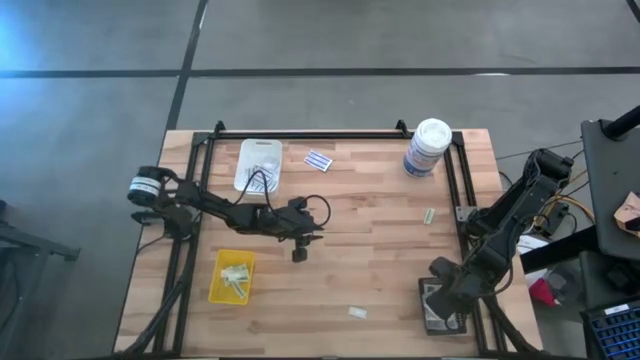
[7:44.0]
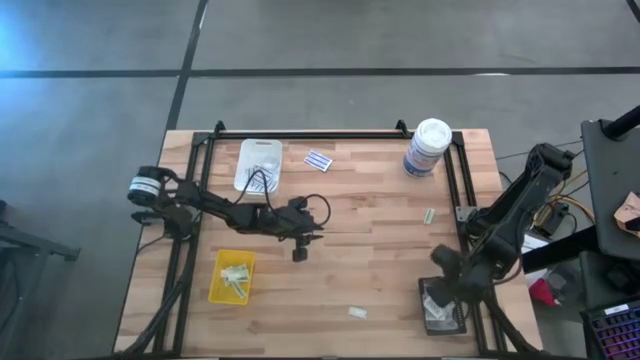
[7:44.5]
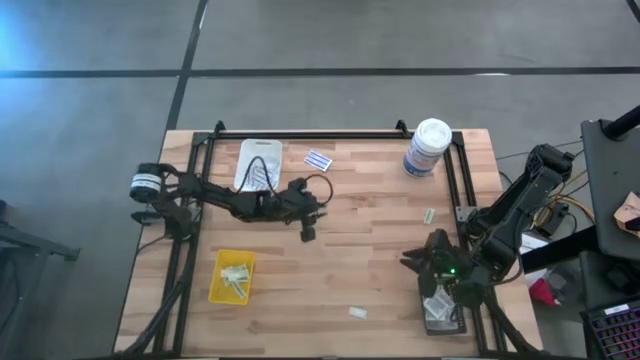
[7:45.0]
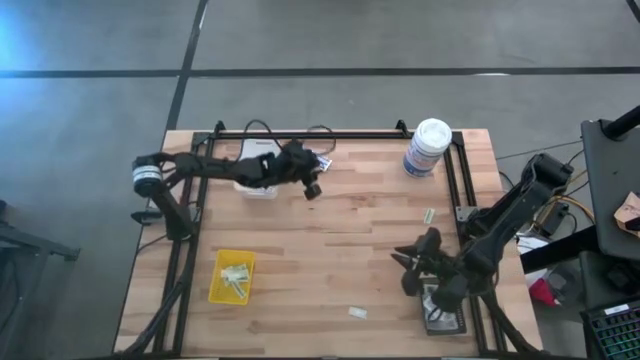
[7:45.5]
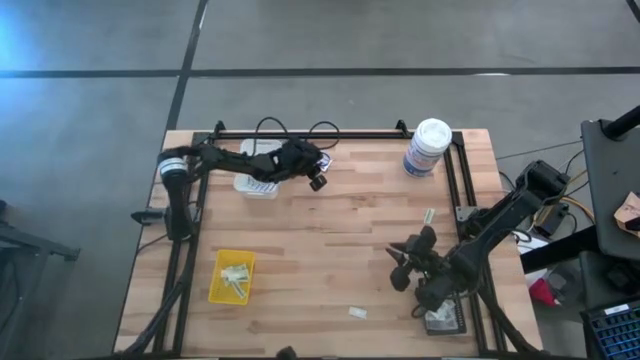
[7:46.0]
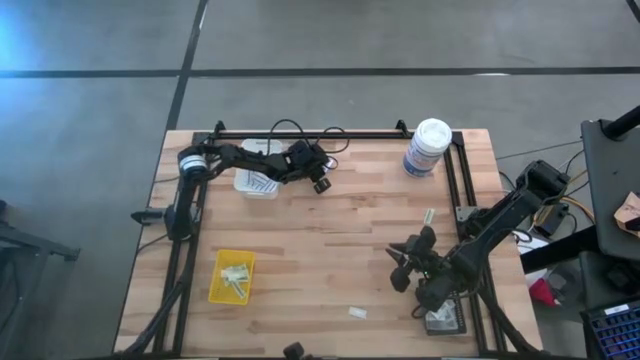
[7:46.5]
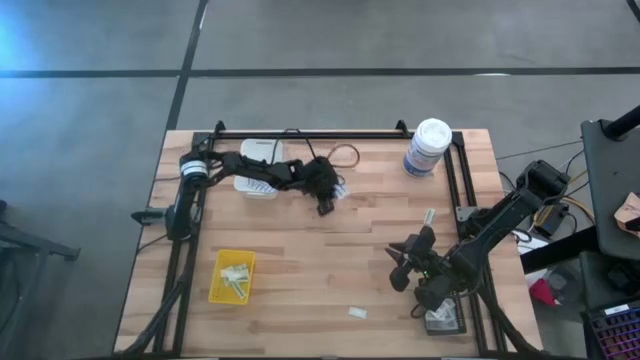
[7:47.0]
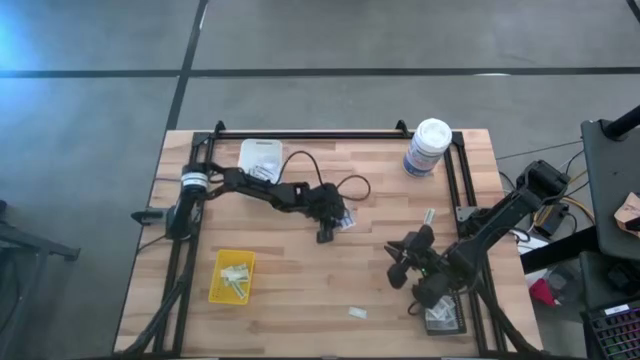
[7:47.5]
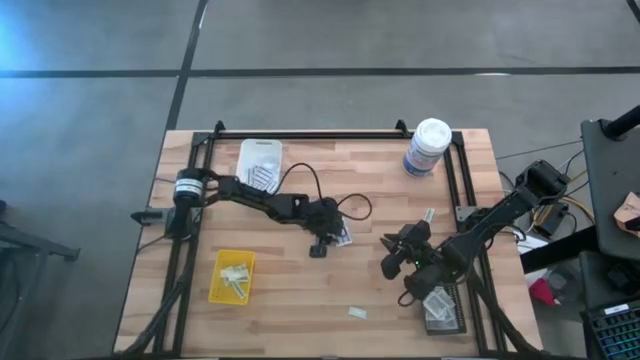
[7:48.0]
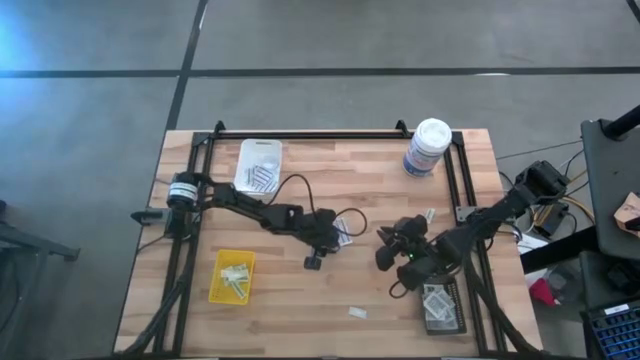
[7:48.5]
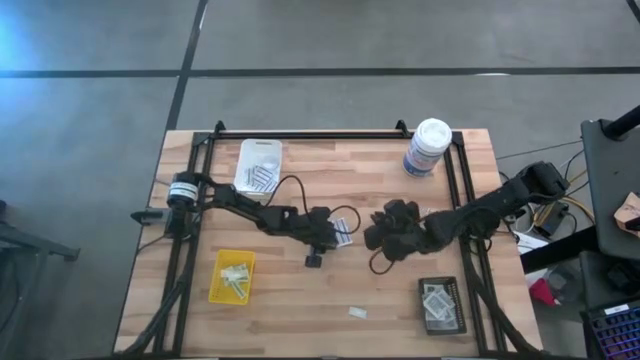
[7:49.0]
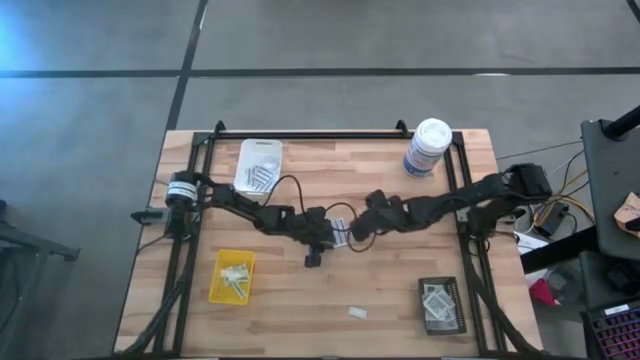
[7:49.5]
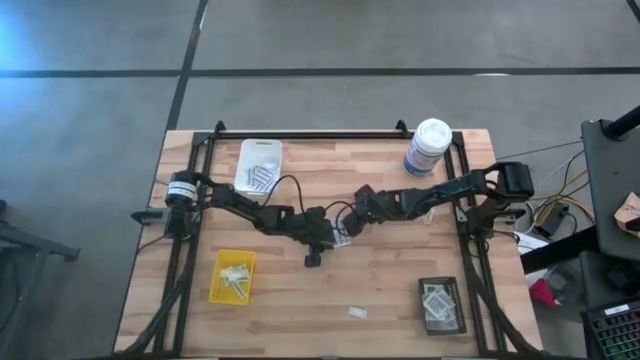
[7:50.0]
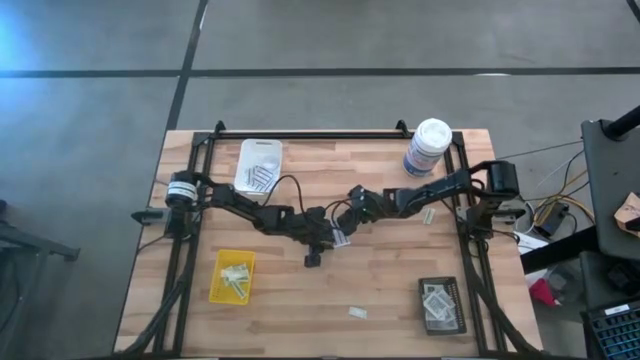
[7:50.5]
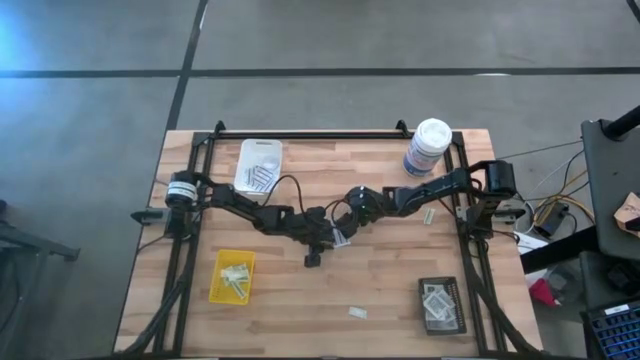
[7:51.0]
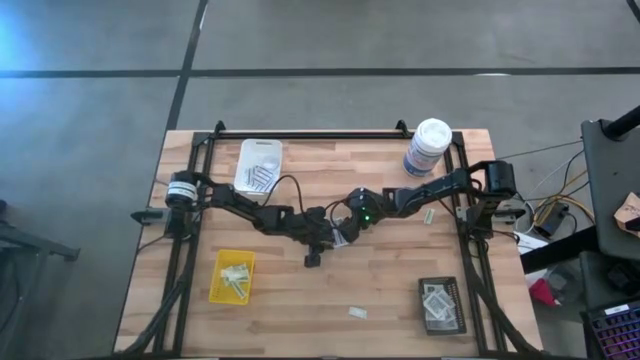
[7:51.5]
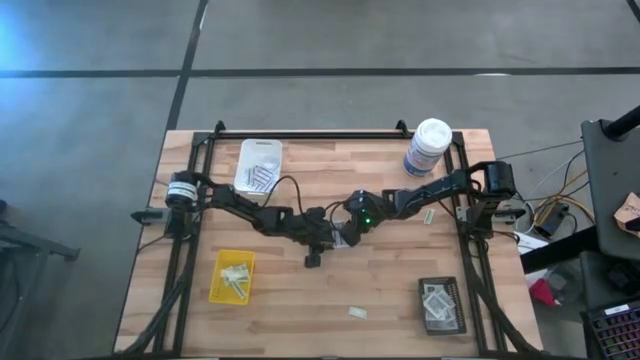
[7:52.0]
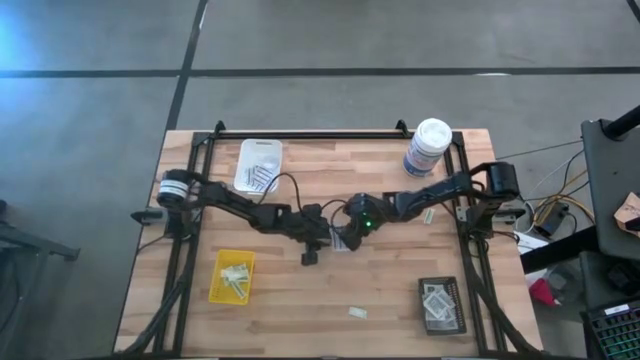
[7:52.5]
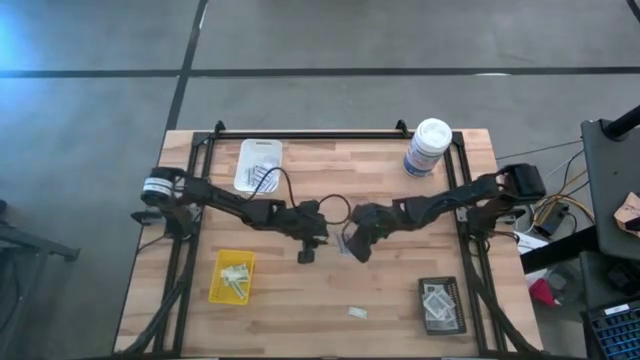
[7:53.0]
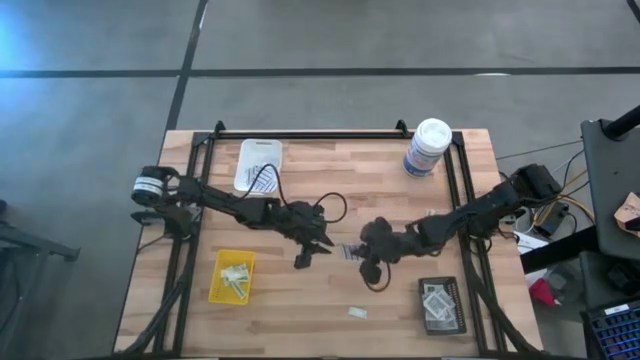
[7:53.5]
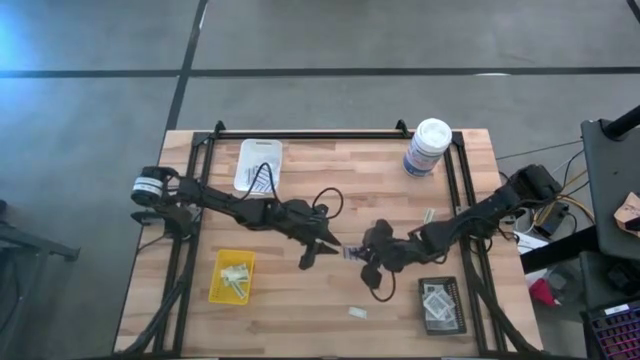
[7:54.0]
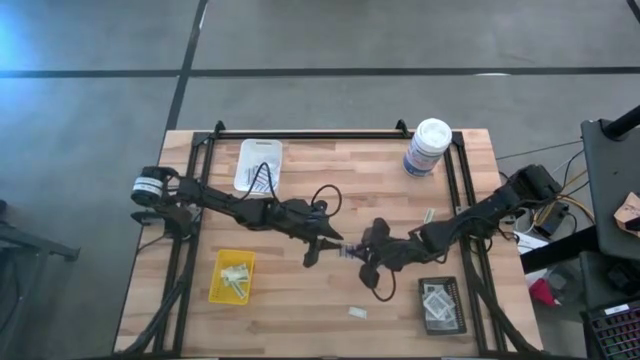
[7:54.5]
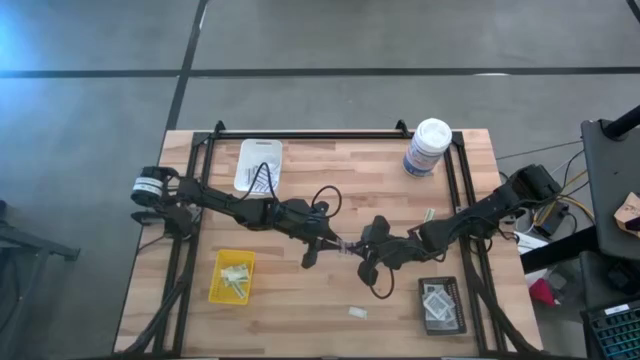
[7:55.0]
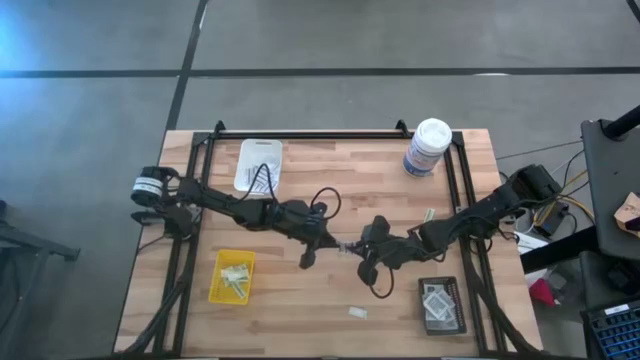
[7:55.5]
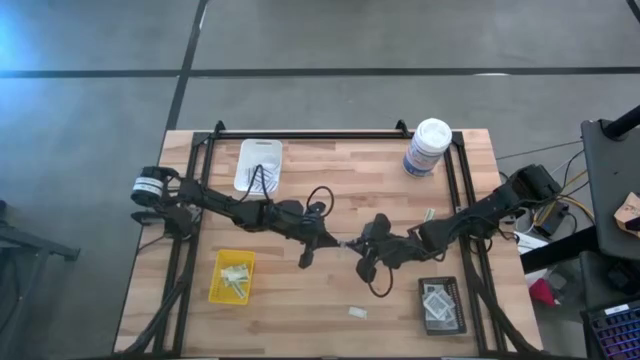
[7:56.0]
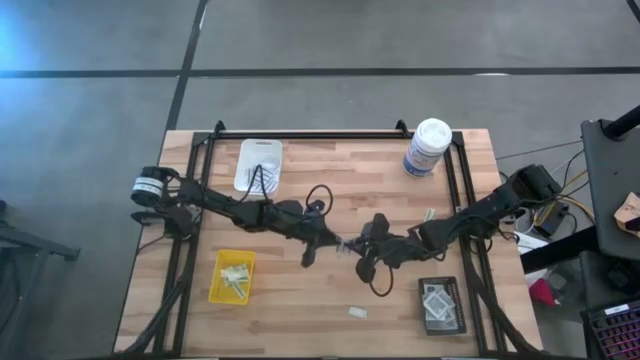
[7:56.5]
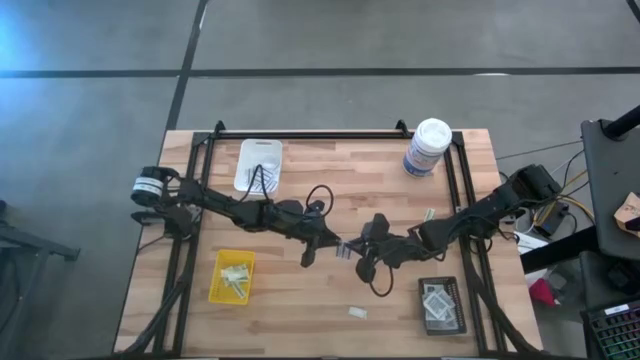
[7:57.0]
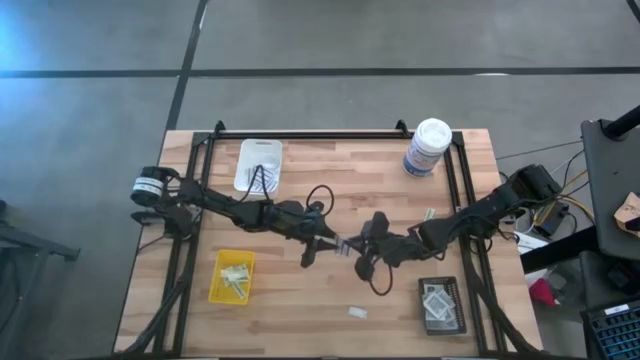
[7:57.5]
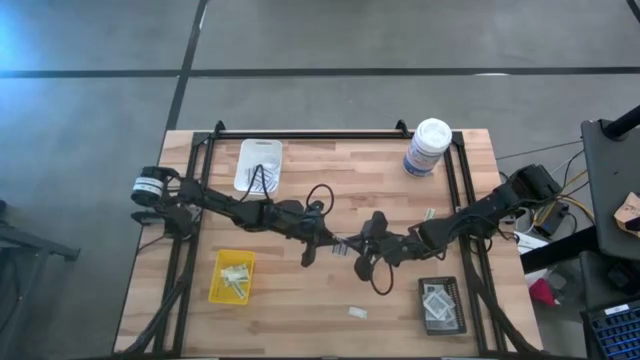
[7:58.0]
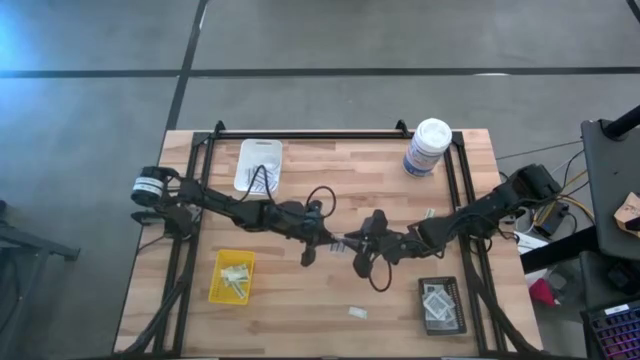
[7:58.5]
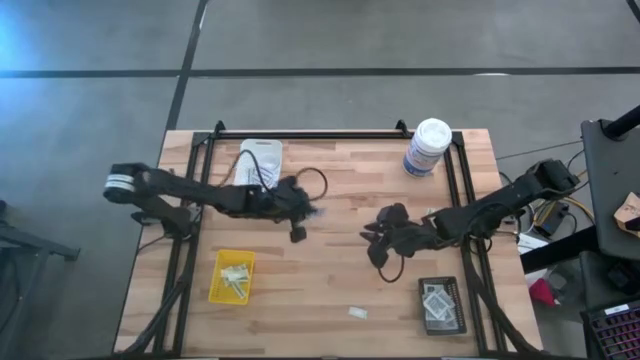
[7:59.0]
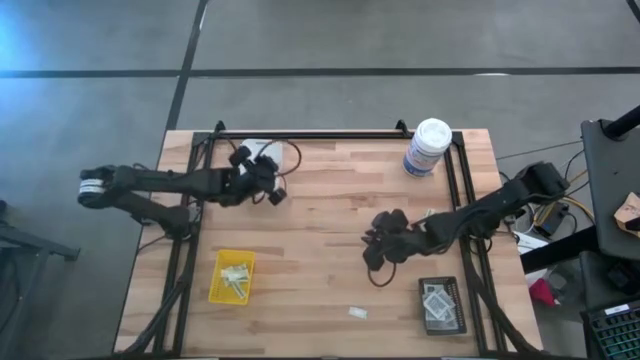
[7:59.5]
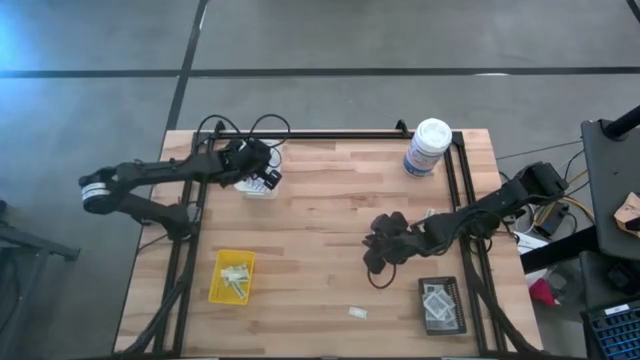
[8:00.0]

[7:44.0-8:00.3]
Task: Pick & Place First Aid Supplies
Put the blue bandage into the white bin

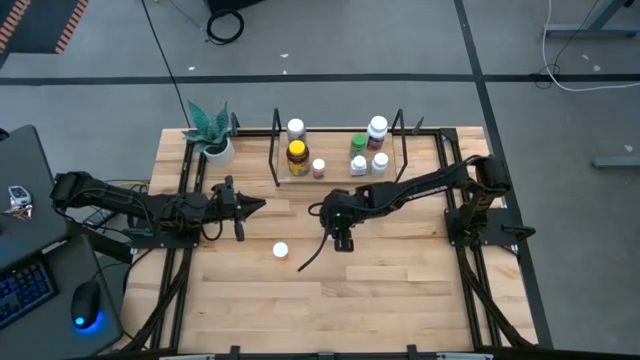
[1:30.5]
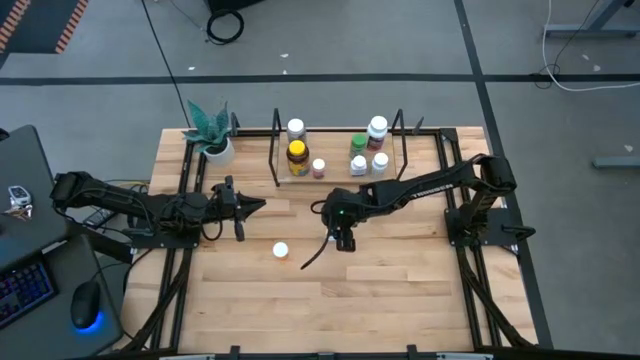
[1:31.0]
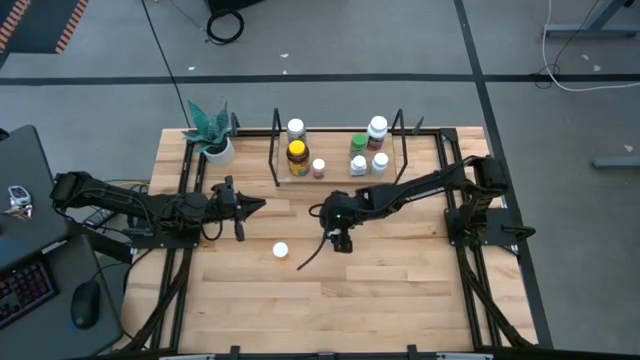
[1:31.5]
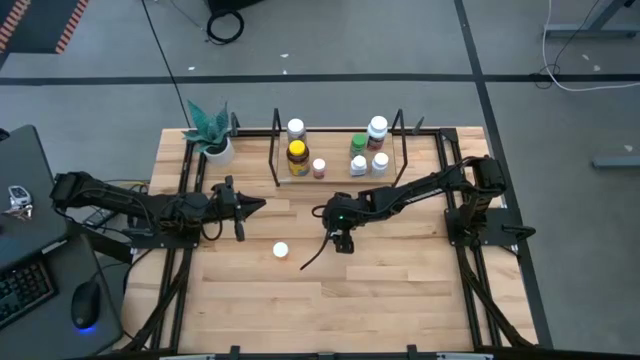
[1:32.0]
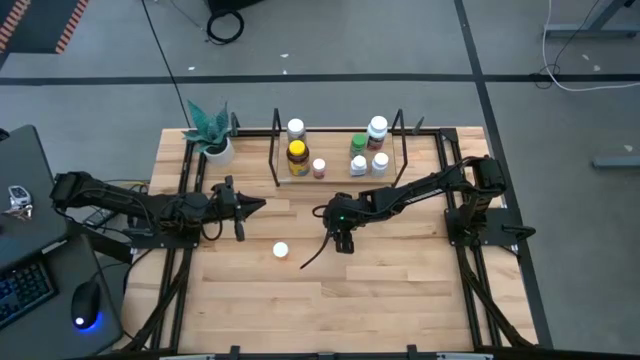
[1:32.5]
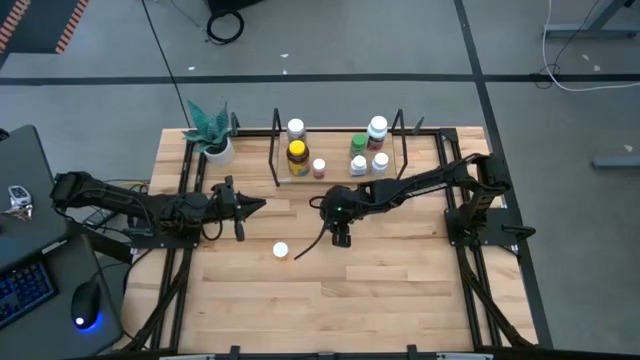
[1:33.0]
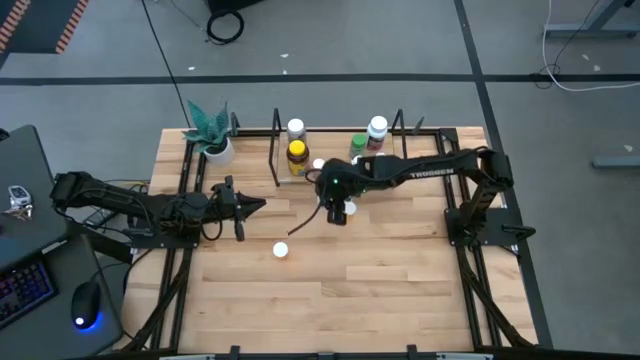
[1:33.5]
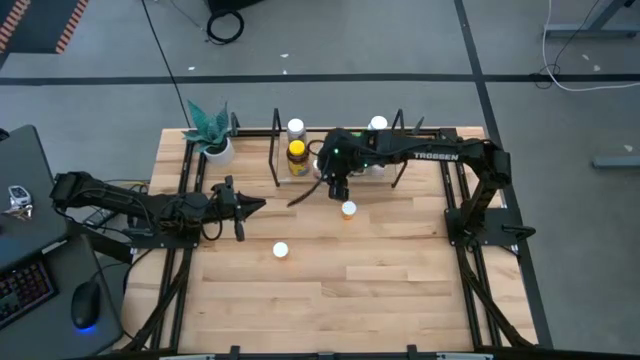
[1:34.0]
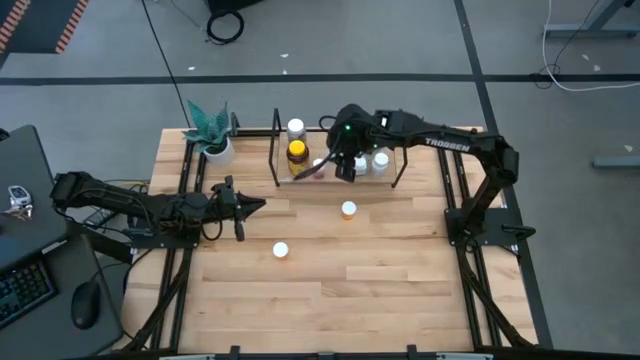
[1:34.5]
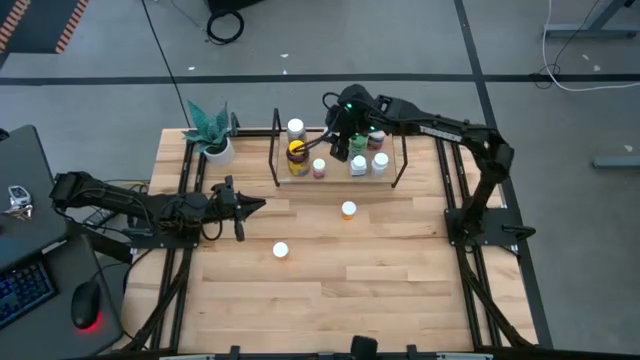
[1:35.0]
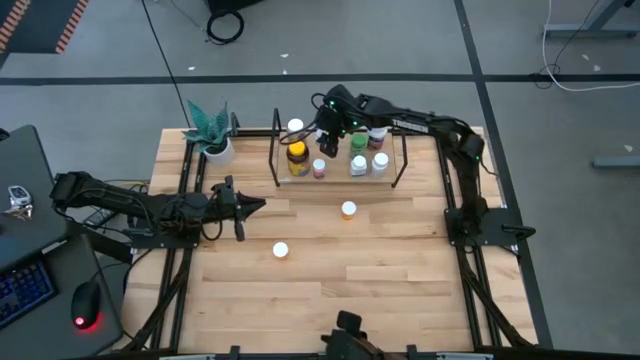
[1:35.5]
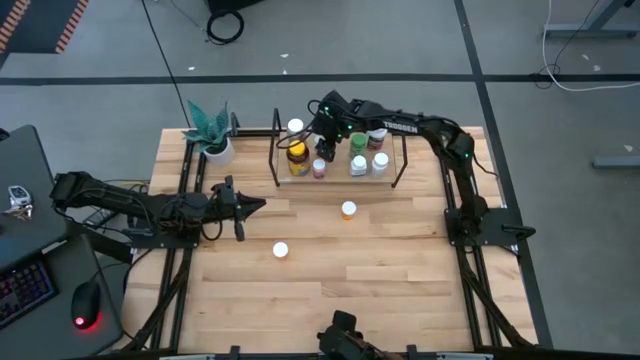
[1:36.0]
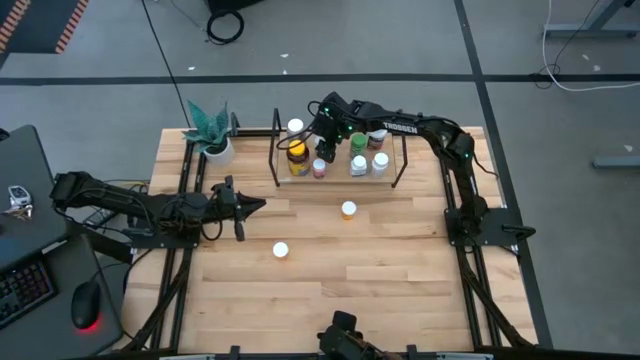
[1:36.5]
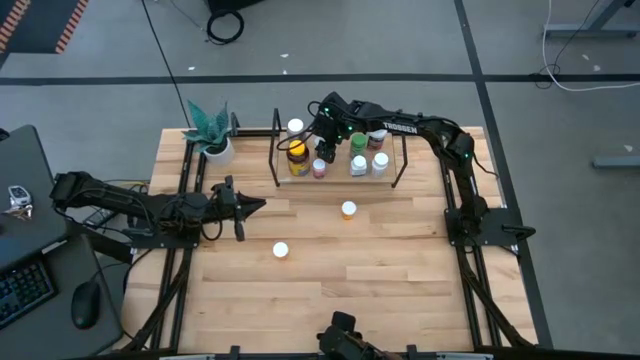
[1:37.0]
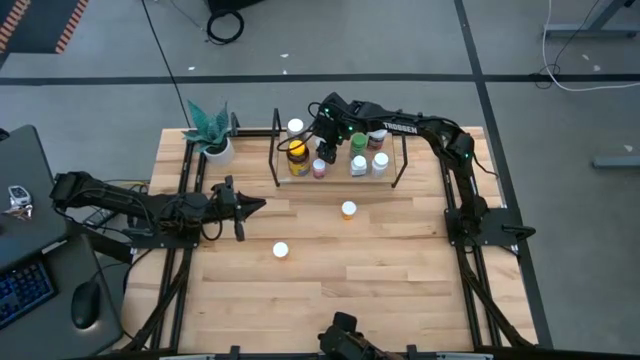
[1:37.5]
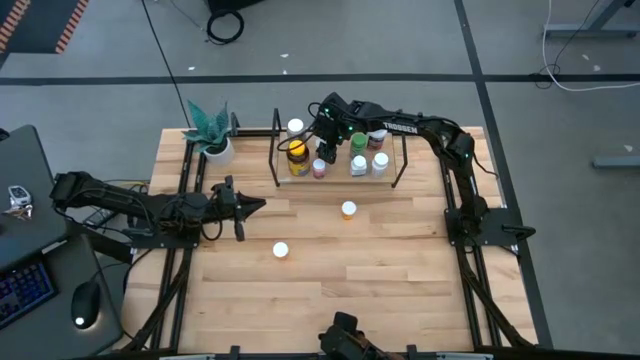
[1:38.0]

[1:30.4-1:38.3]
Task: Pick and place medicine bottles onto shelf by color
Put the white medicine bottle on the shelf
